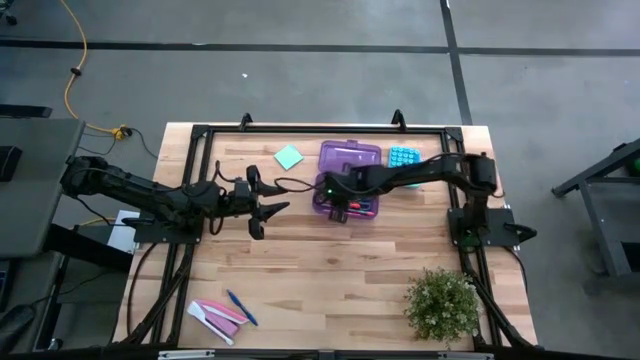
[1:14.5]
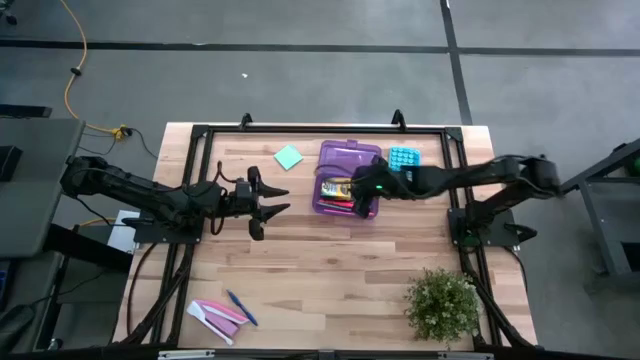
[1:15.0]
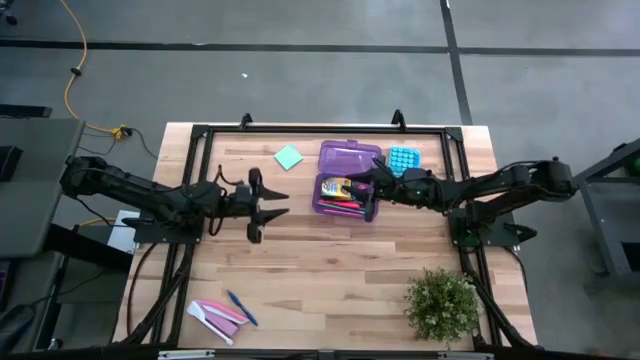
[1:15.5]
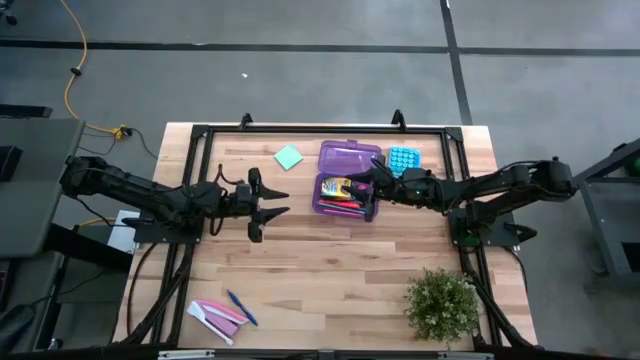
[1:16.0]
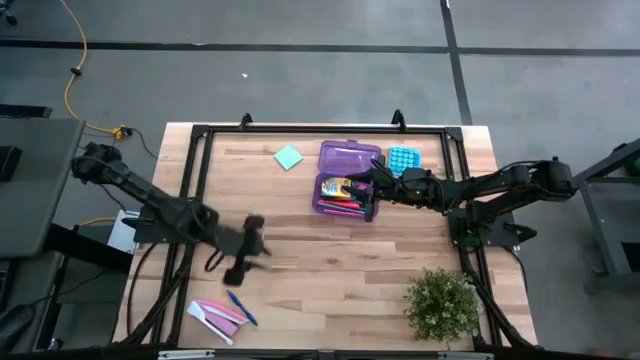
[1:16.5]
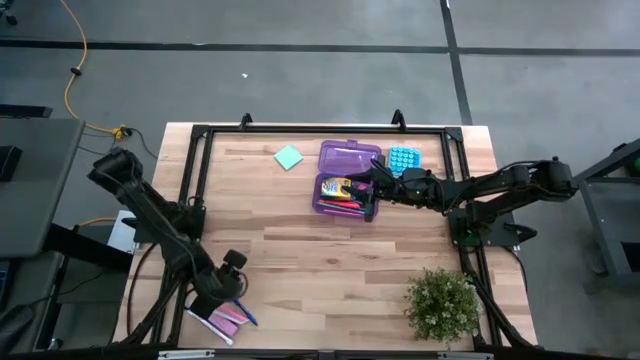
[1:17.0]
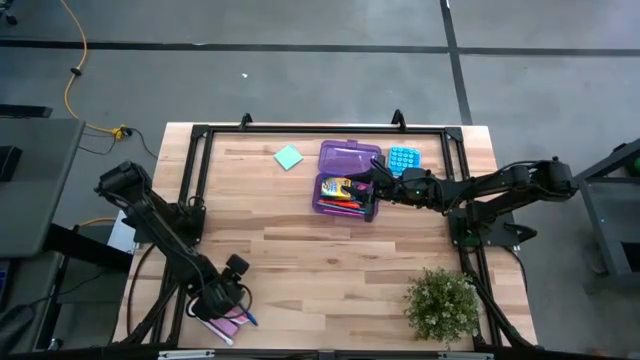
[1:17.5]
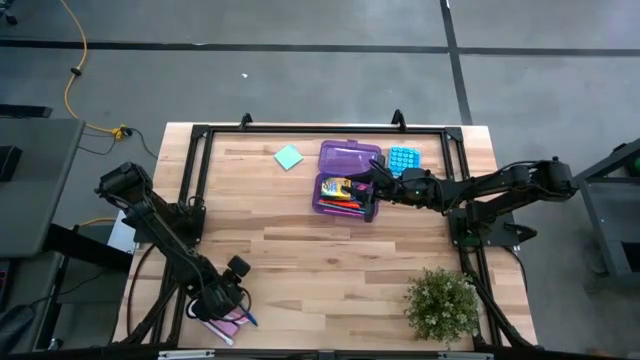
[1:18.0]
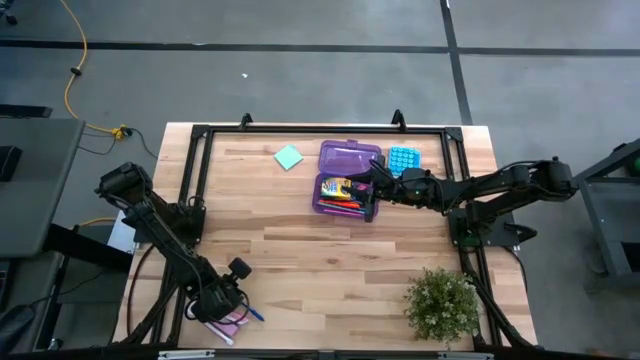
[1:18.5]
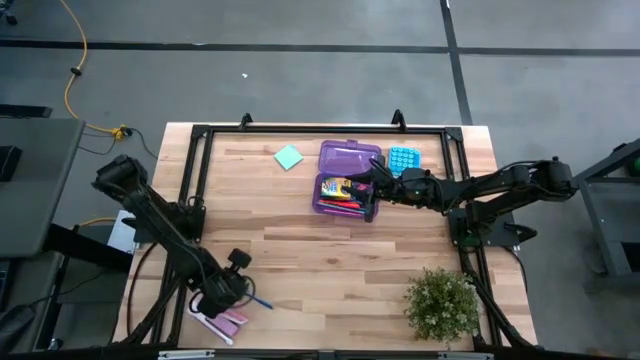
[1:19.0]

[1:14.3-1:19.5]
Task: Pack school essentials
Put the blue pen into the violet supply box

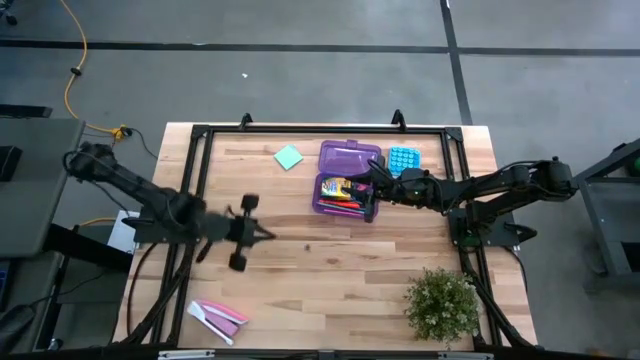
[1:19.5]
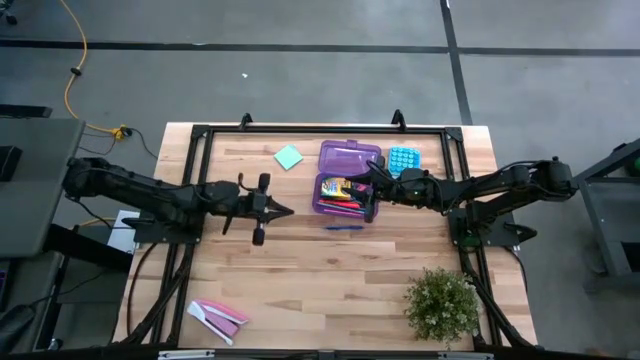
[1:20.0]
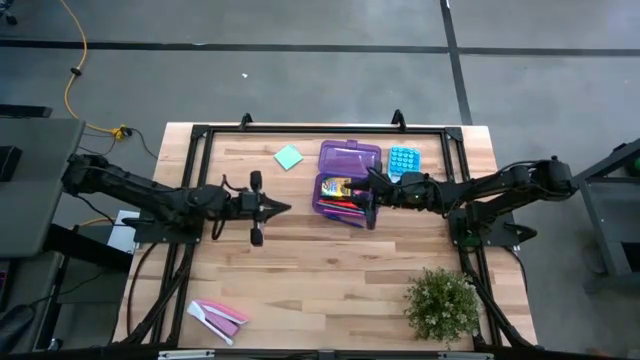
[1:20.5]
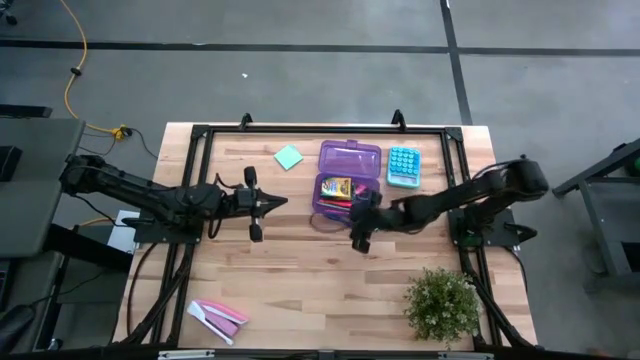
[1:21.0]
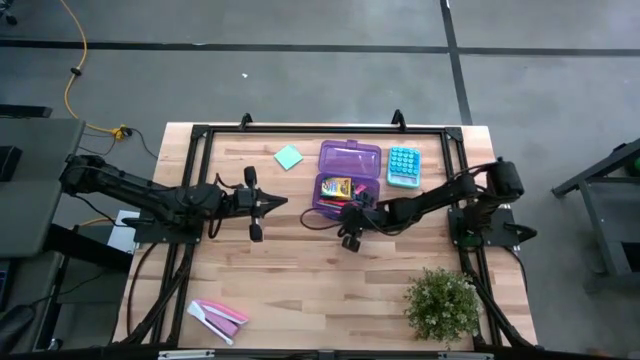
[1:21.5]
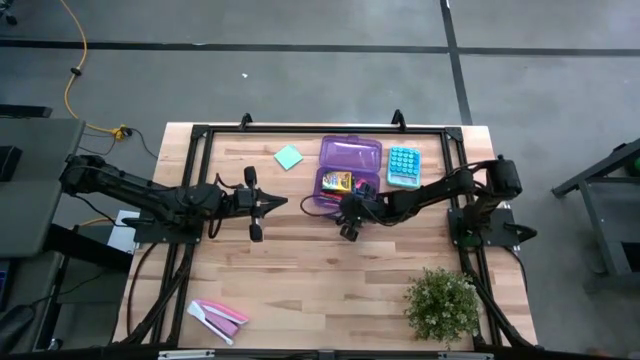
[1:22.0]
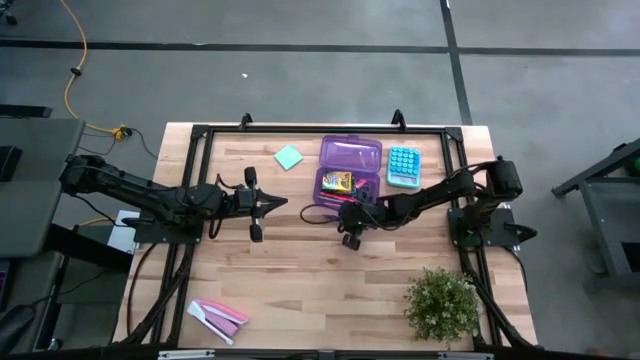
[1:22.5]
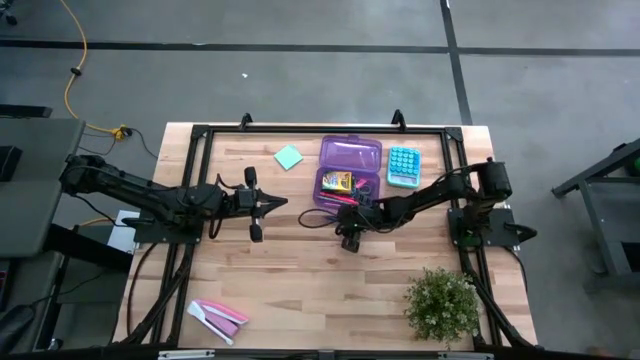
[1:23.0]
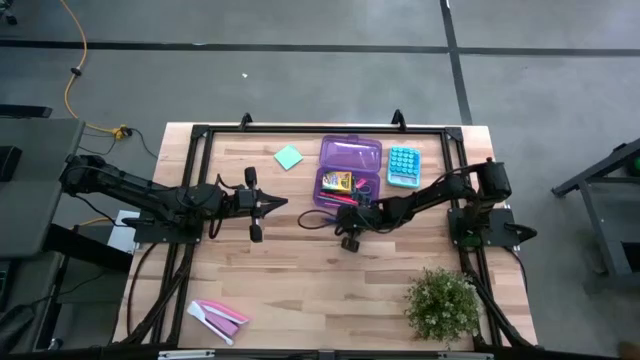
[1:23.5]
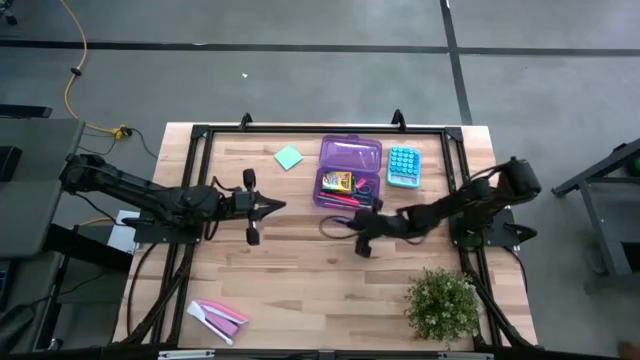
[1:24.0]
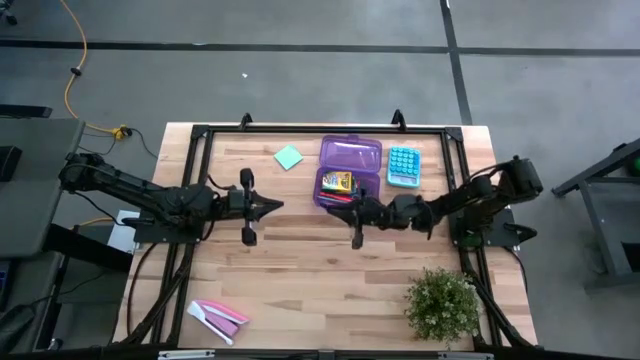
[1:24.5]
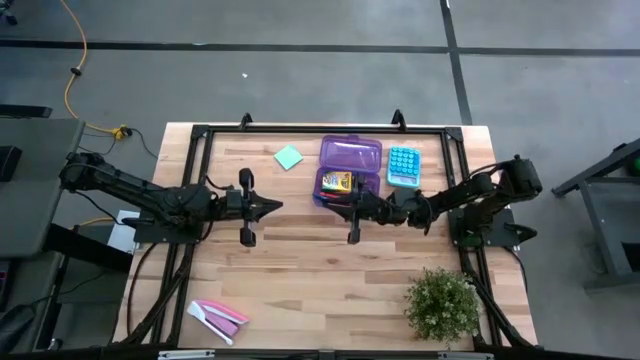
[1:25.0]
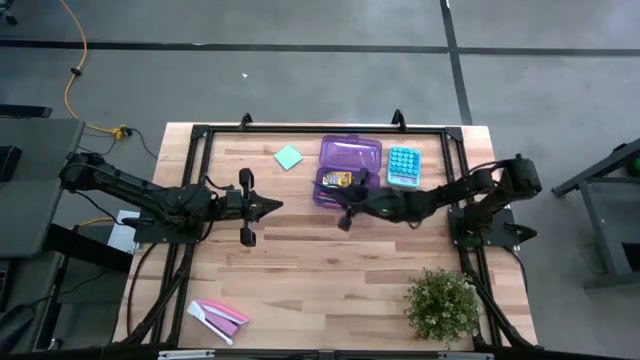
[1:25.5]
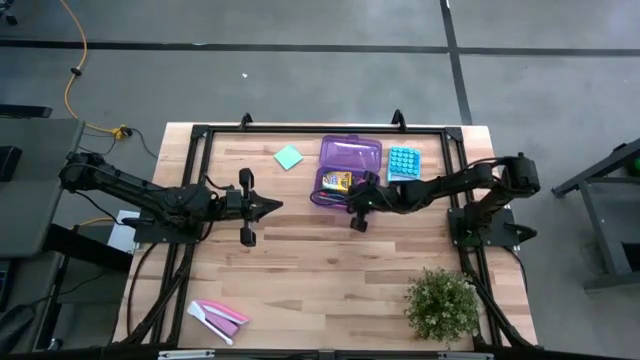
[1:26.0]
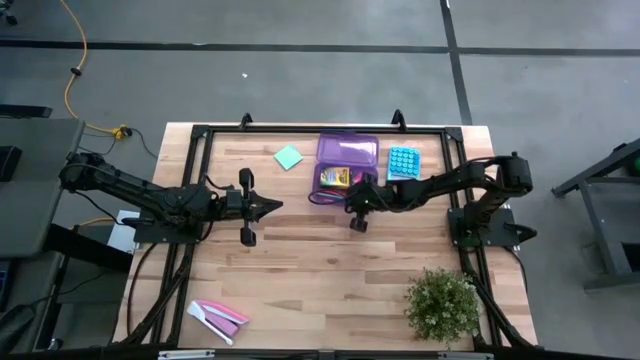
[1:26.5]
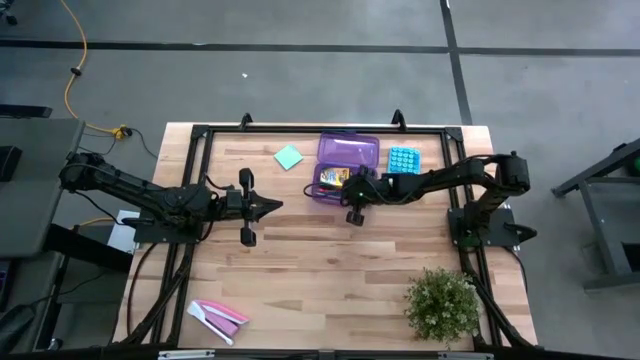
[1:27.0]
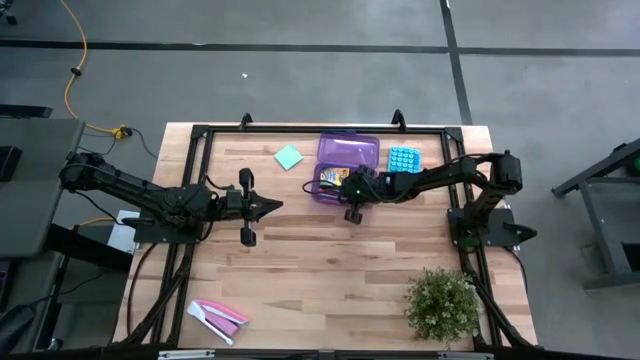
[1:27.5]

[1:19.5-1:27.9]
Put the blue pen into the violet supply box

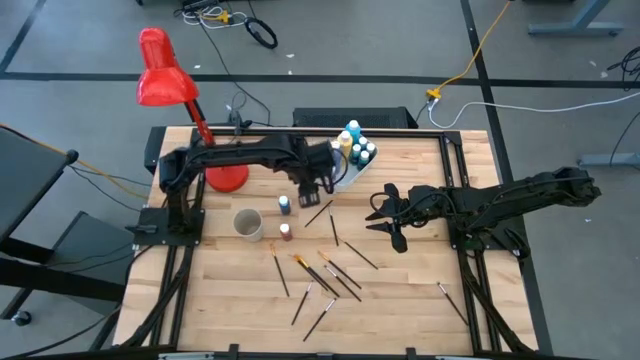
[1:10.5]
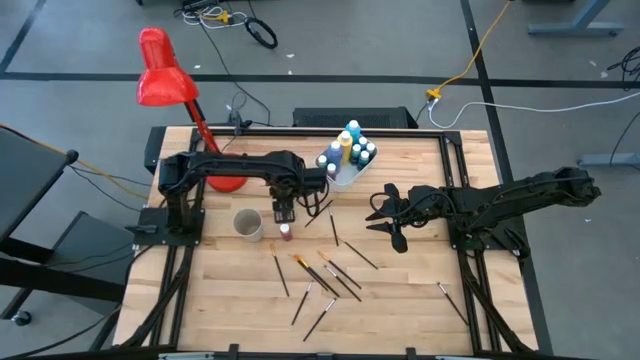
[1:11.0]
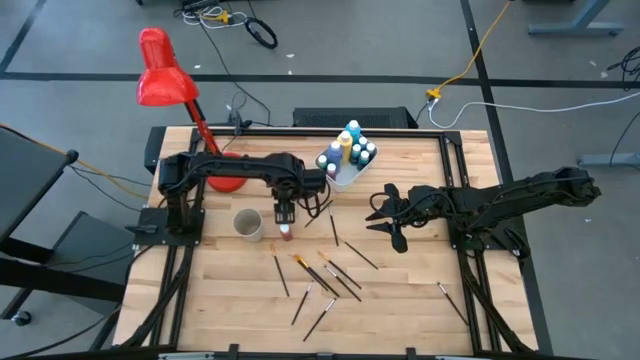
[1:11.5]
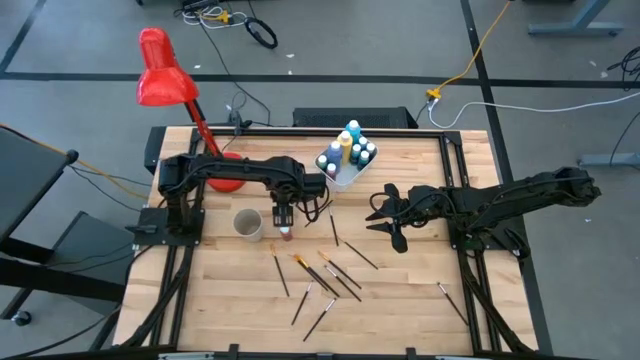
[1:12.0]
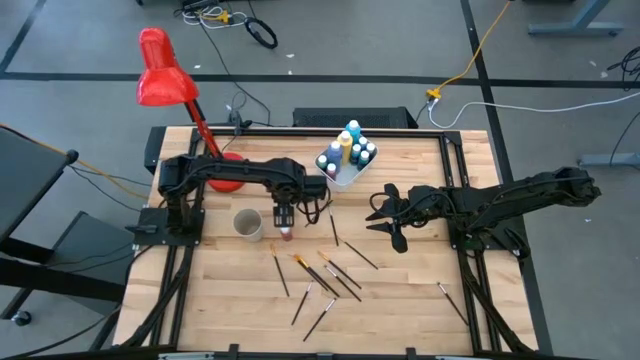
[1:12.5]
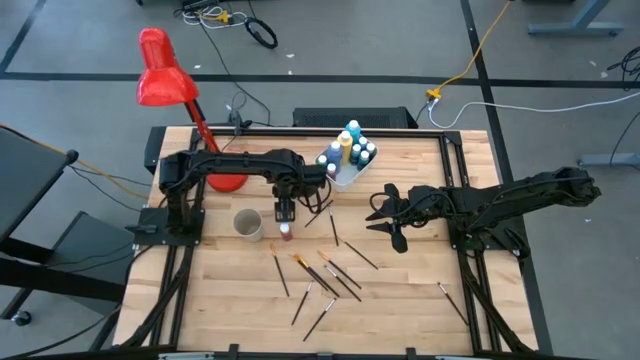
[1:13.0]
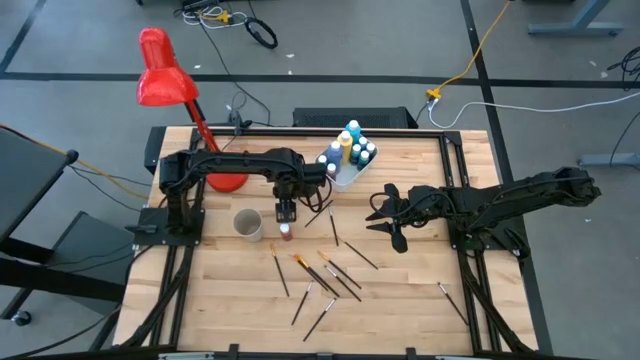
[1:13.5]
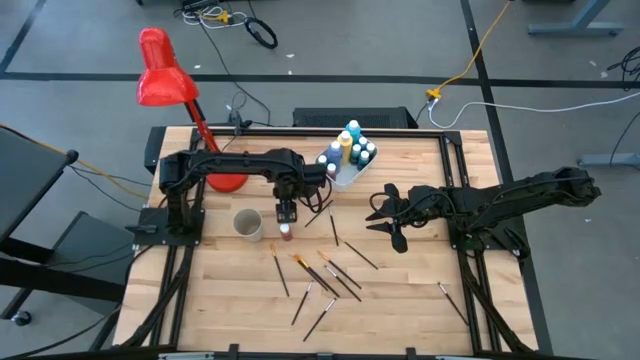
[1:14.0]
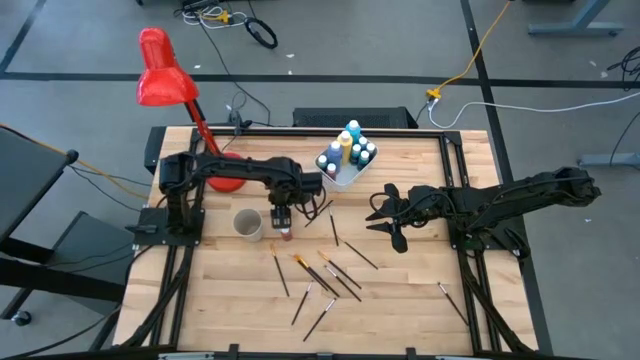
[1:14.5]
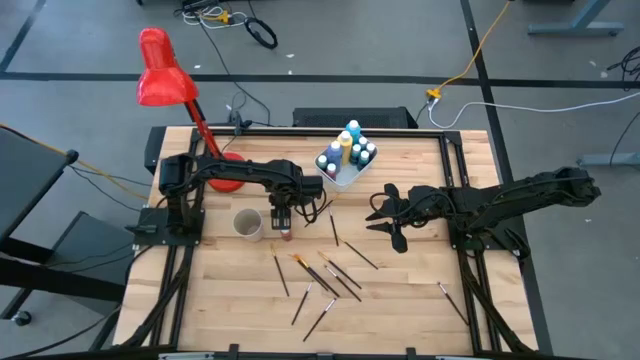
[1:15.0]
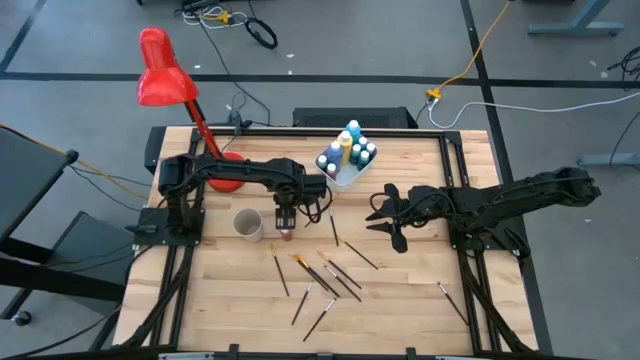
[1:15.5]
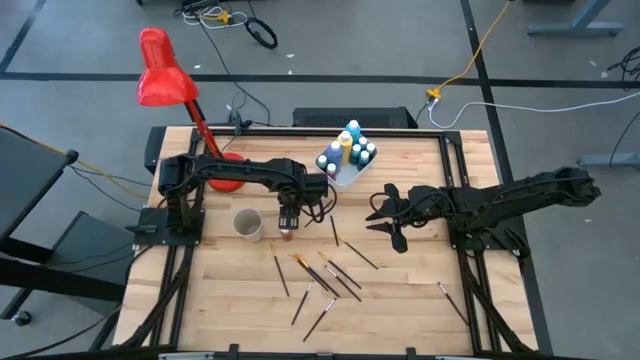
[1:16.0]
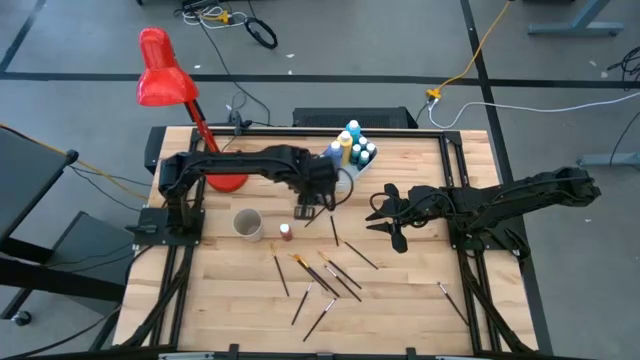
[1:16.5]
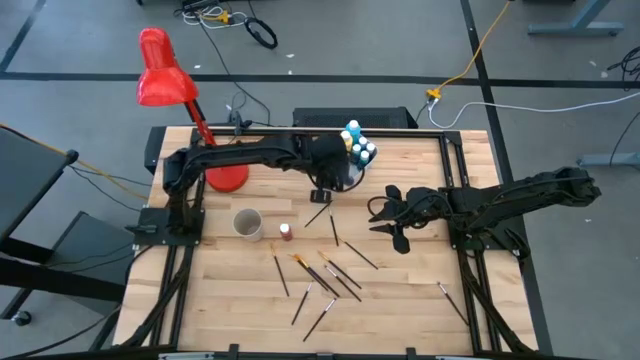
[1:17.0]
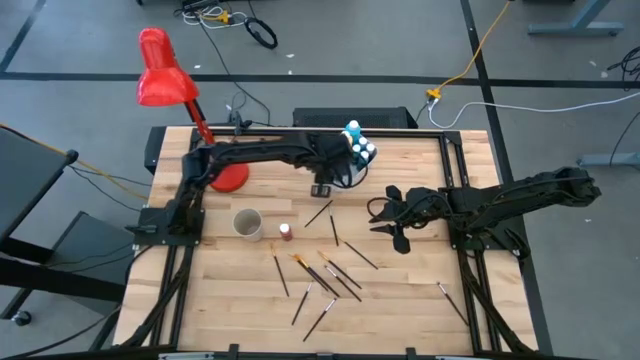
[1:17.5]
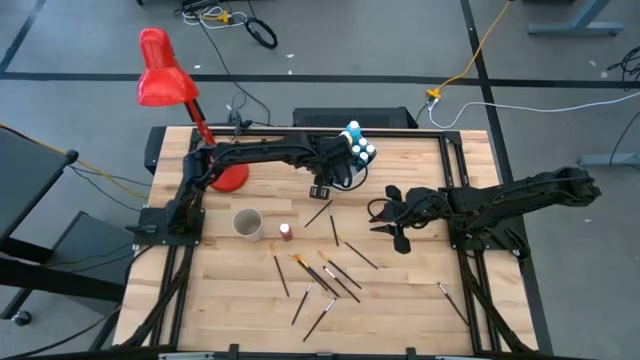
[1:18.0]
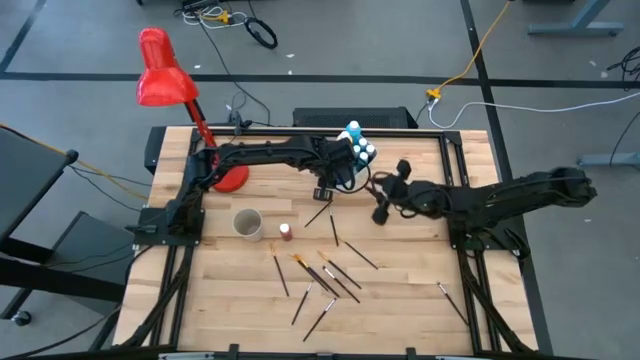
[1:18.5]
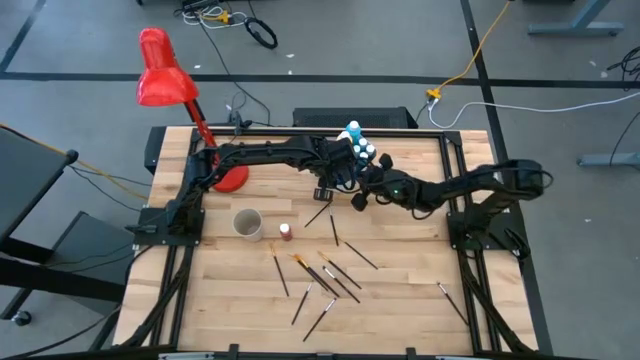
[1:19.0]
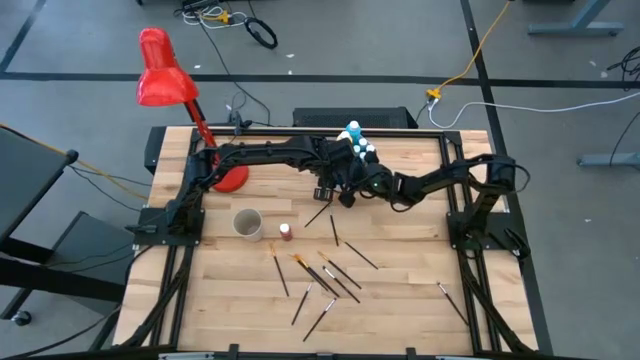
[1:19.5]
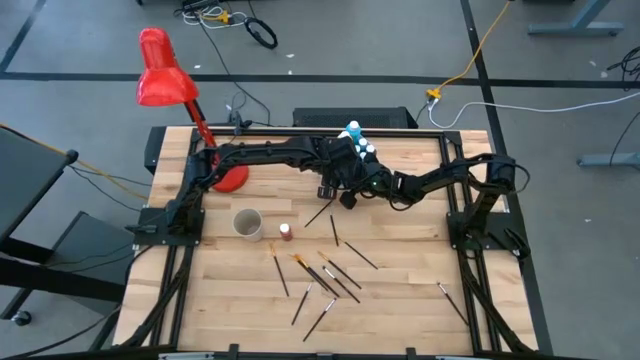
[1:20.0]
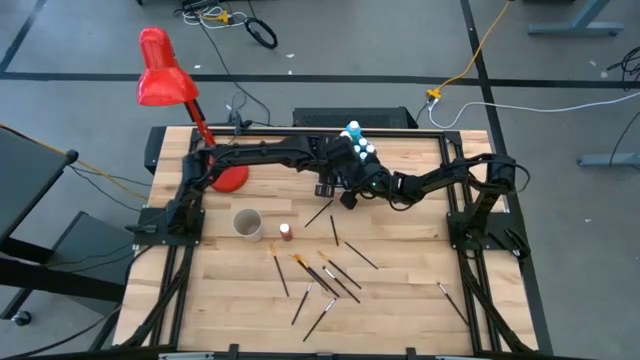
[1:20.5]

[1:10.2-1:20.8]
Task: Pick & Place Paint Supplies
Put the small dark blue paint bottle into the white bin
